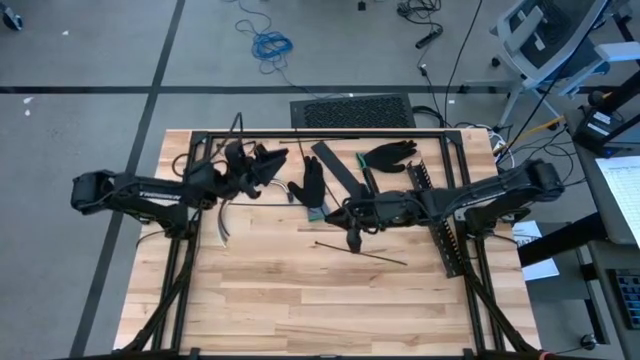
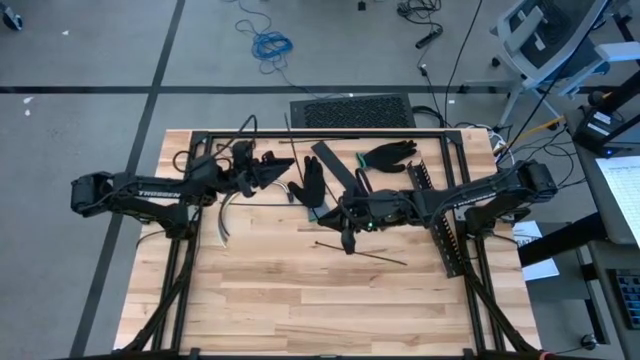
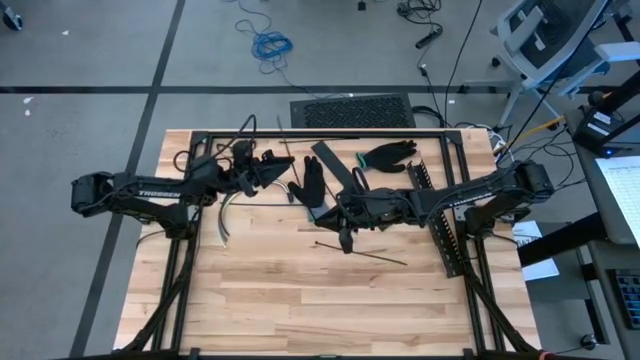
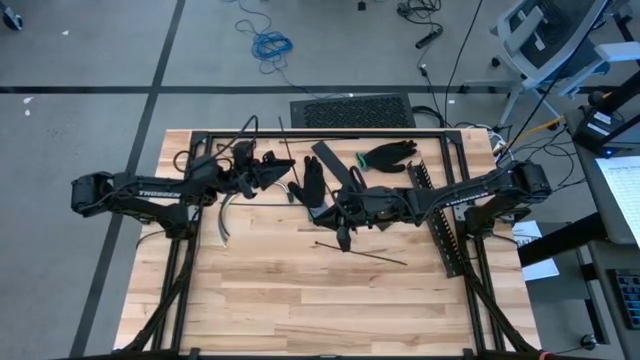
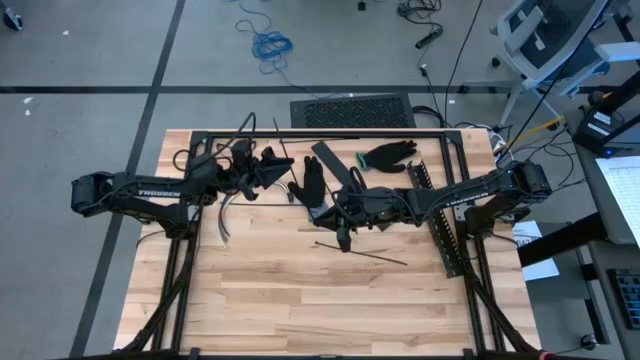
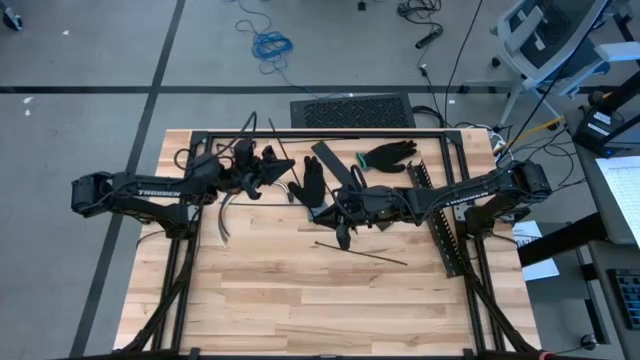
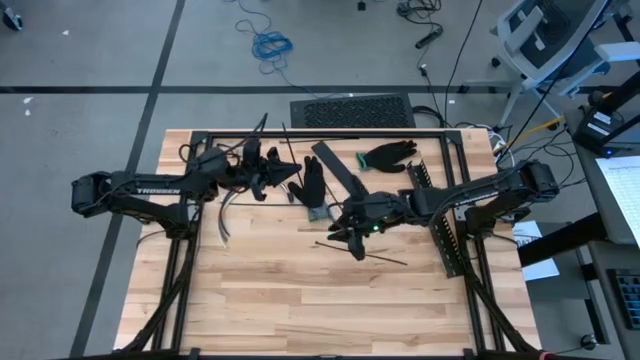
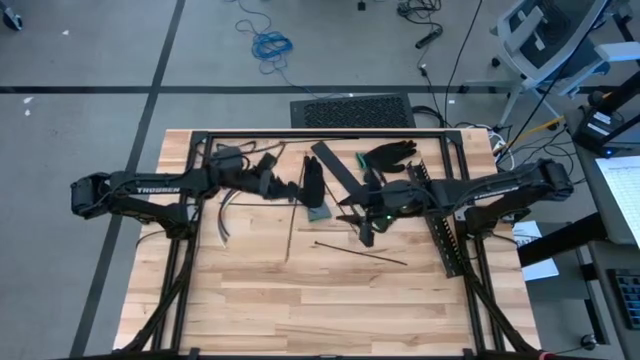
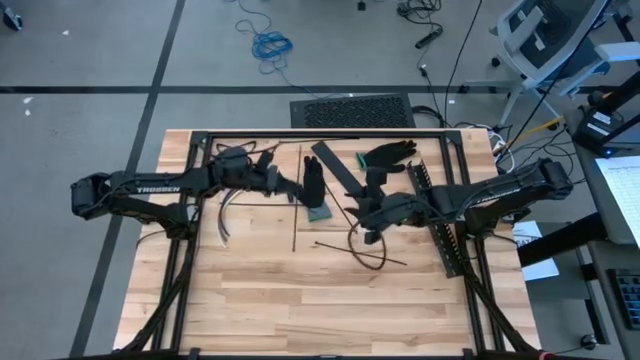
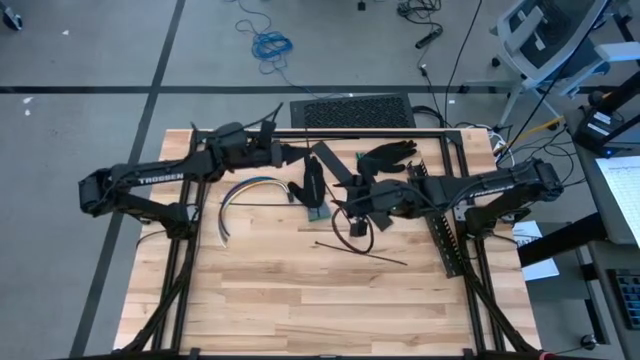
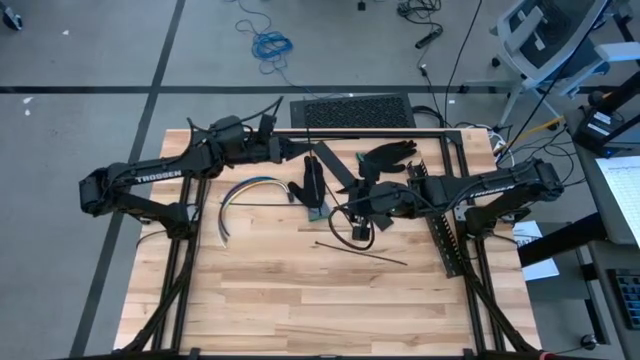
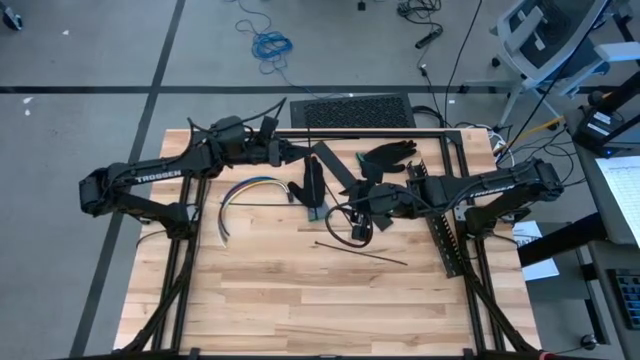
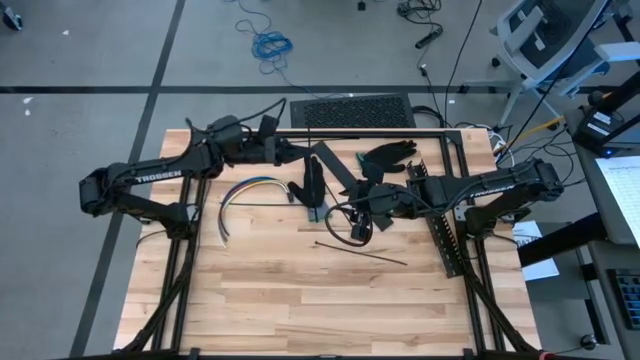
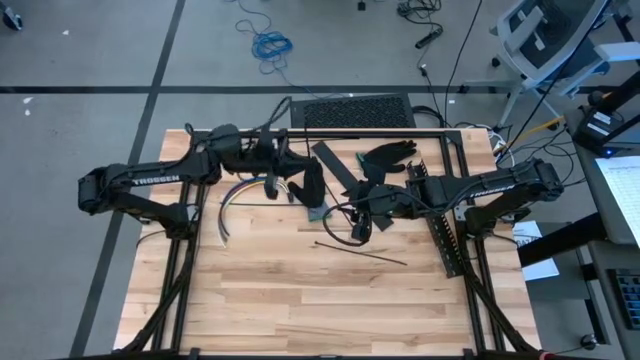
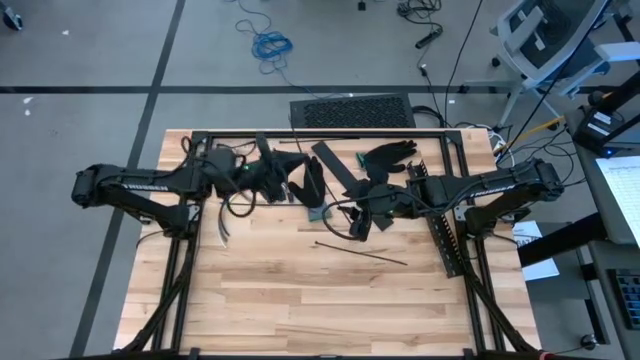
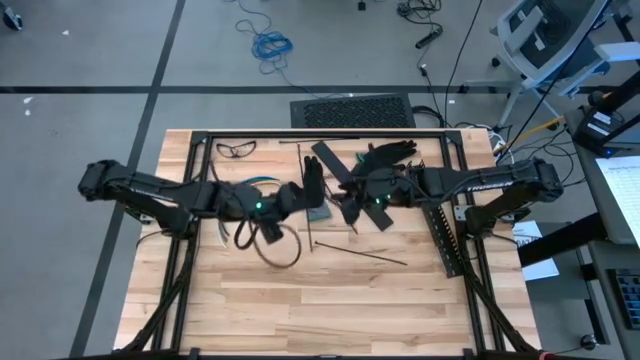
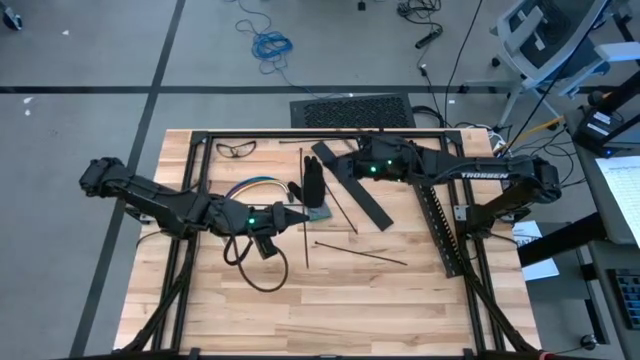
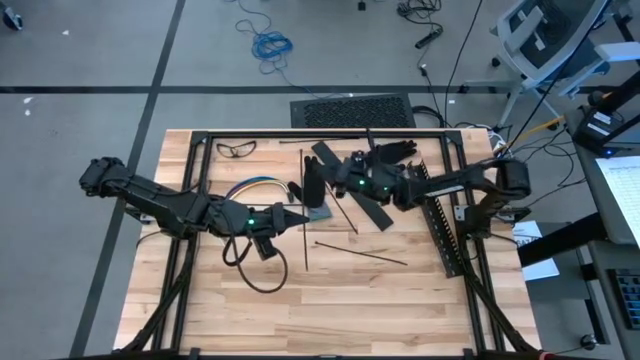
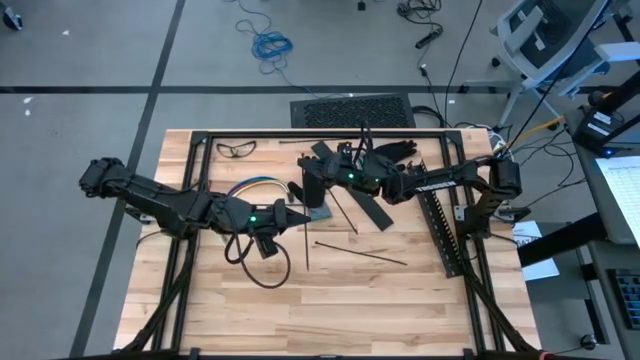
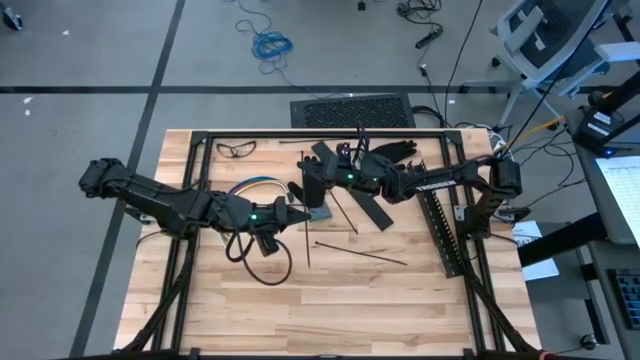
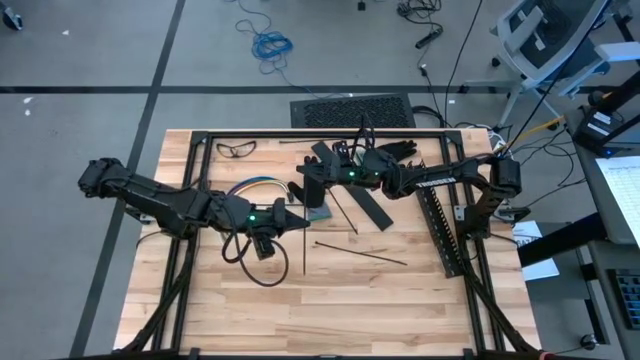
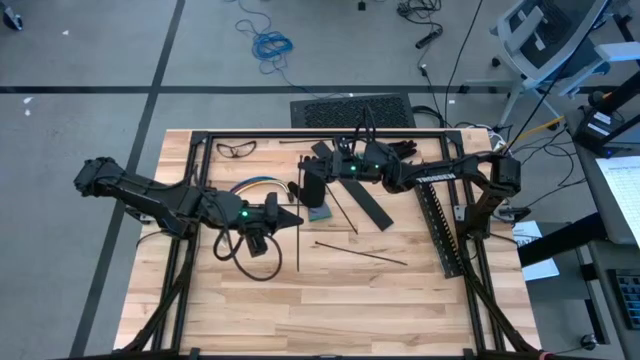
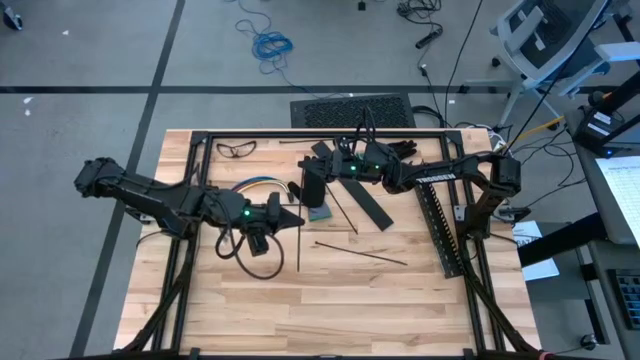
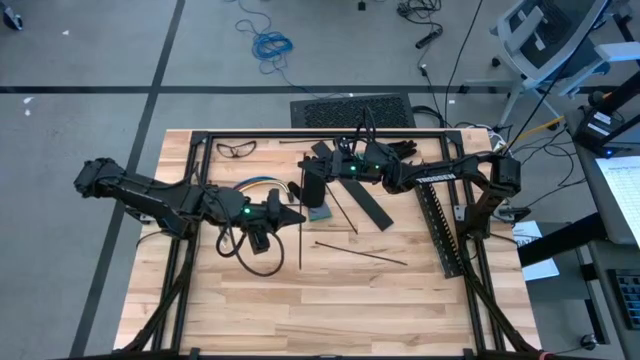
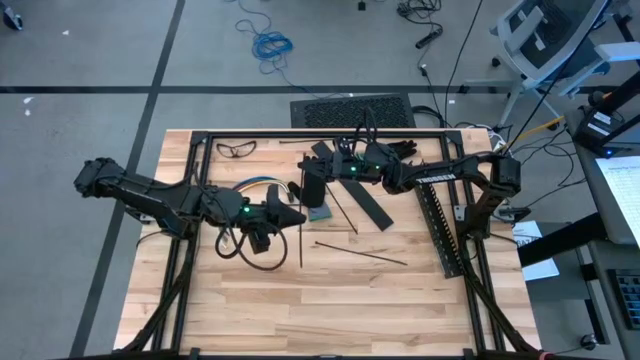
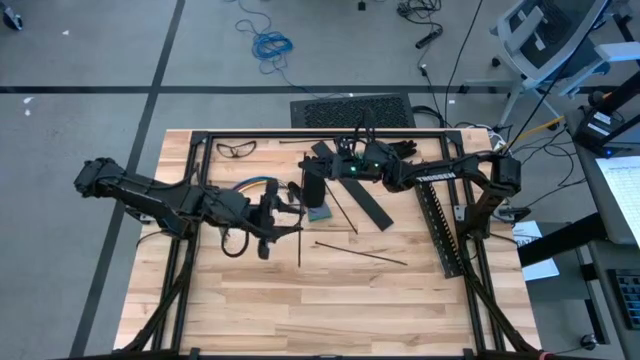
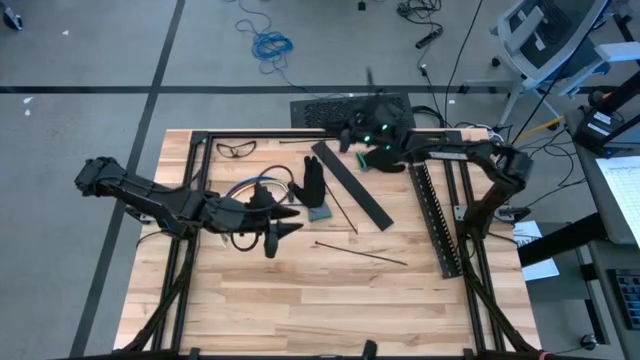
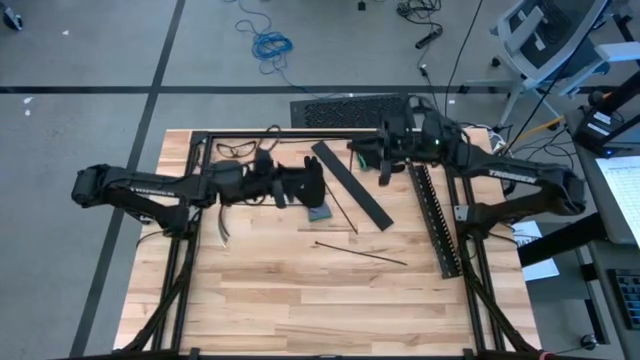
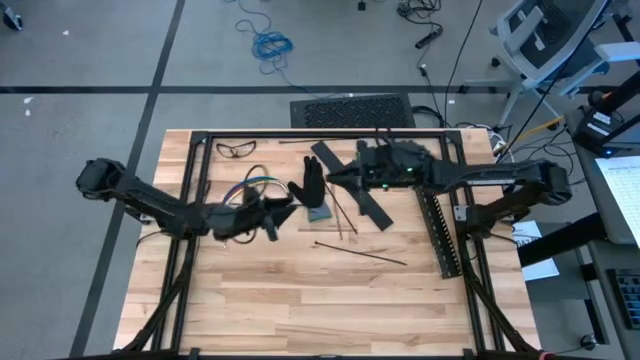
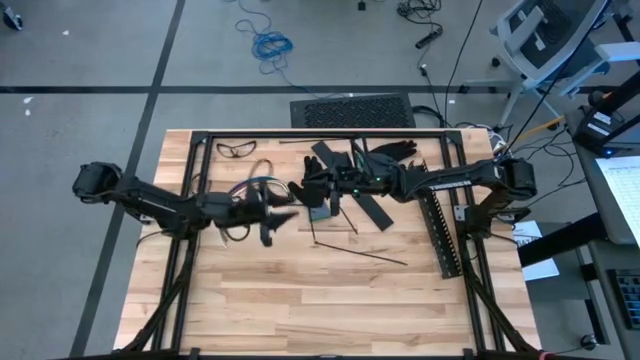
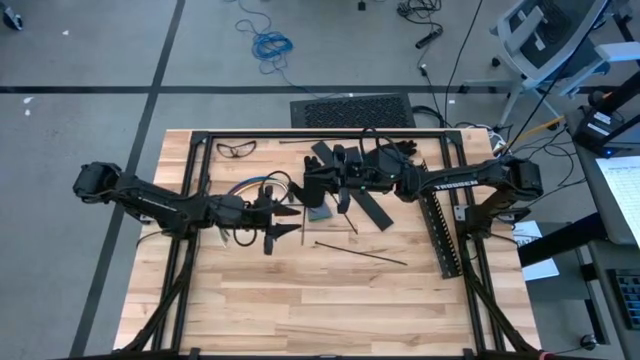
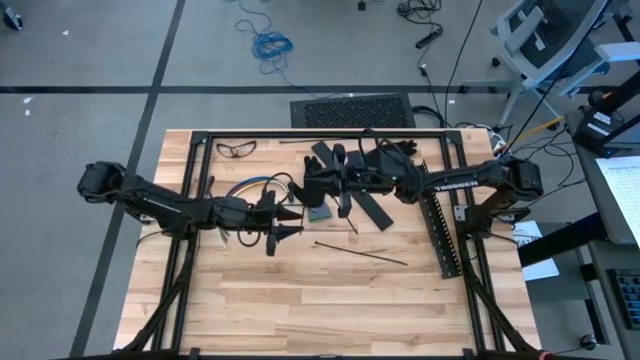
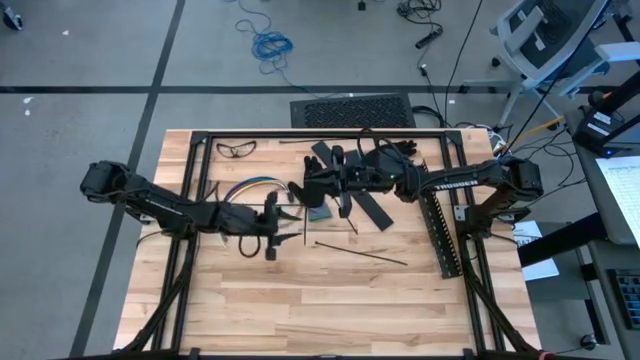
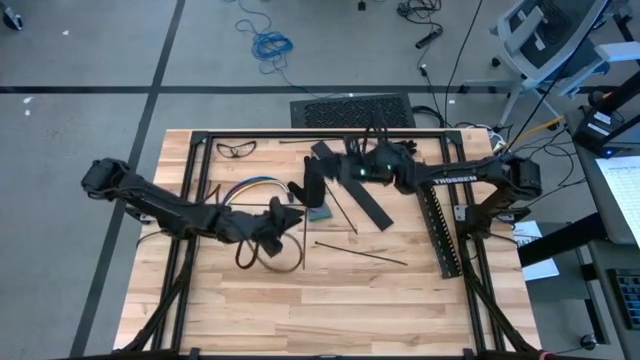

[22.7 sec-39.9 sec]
Task: Ziptie cables
Wrap the black zip tie on the cable

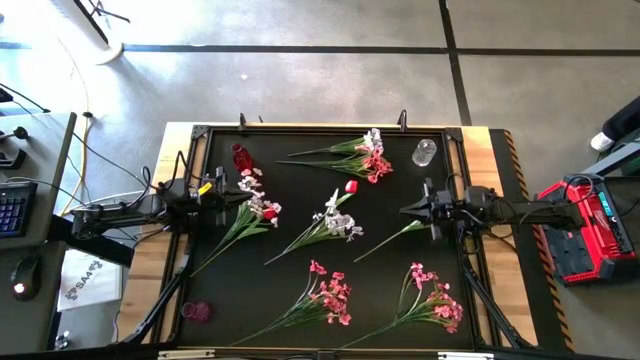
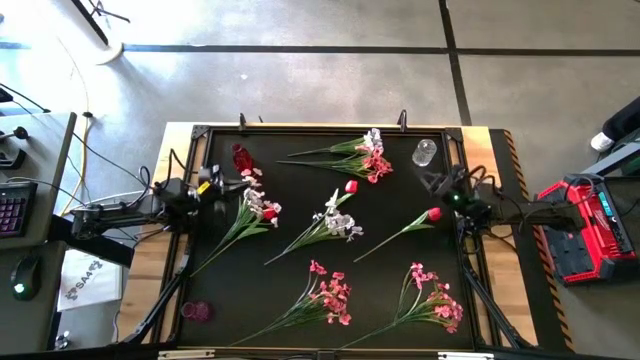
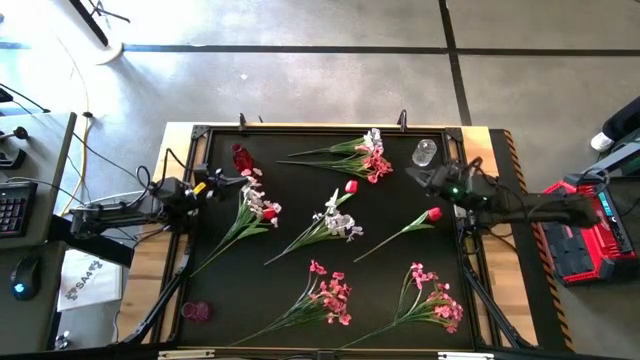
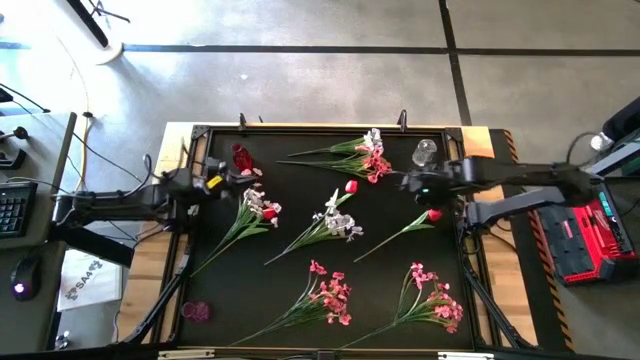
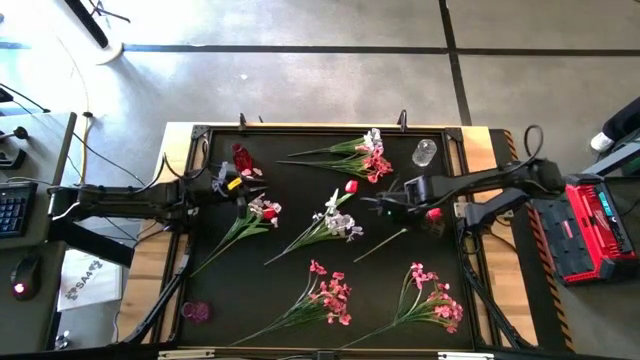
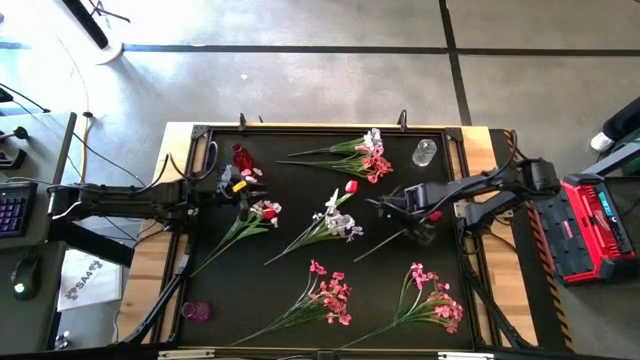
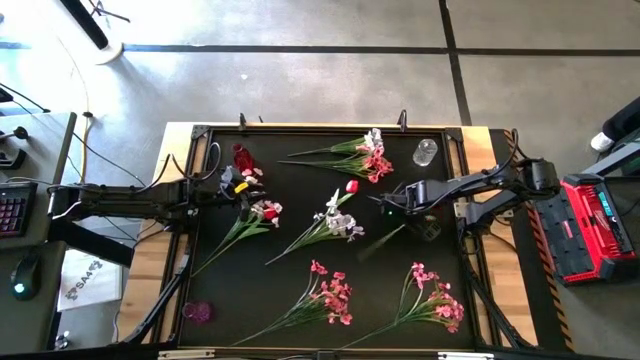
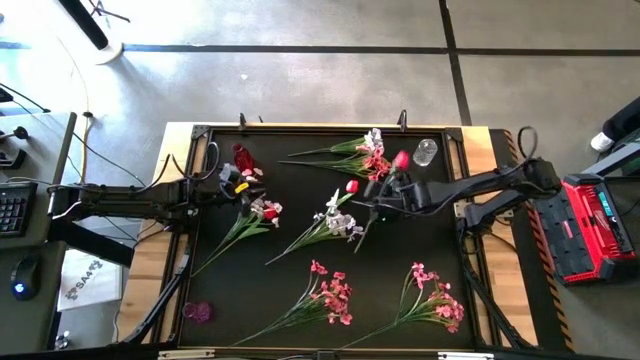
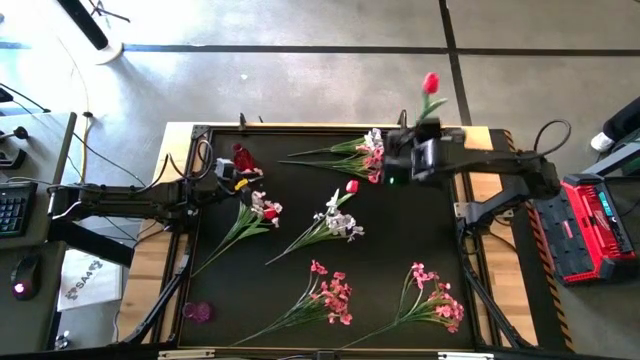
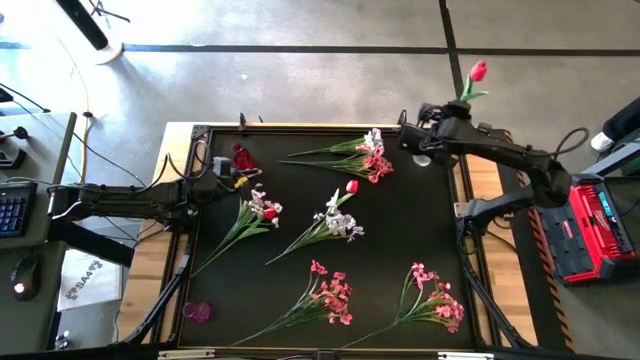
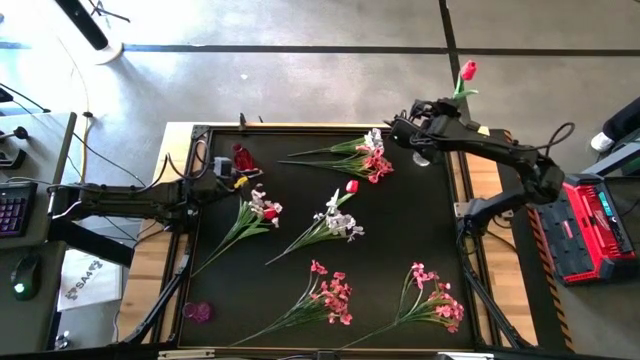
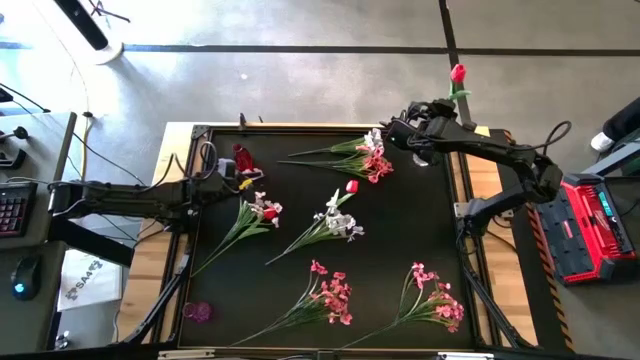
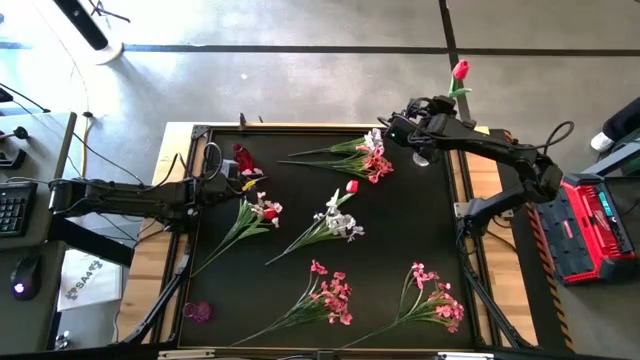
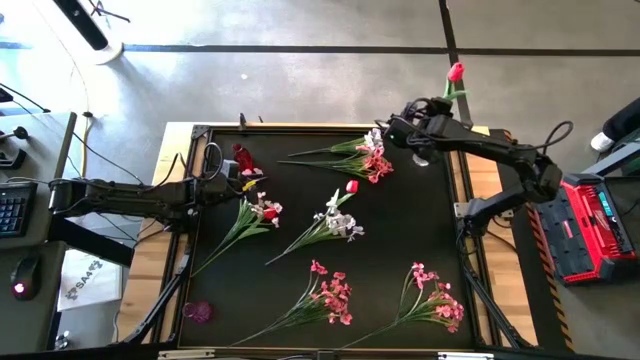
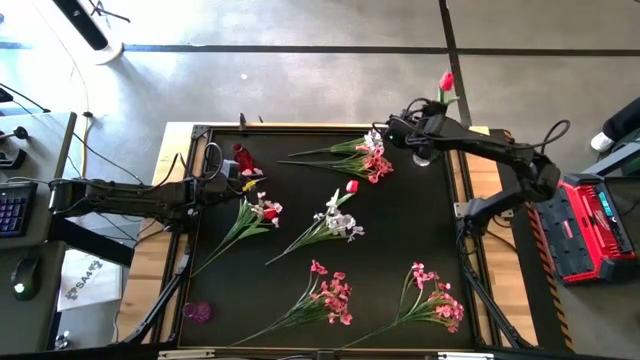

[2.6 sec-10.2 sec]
Task: Sort flowers into vase by color
Put the right red tulip into the transparent vase
